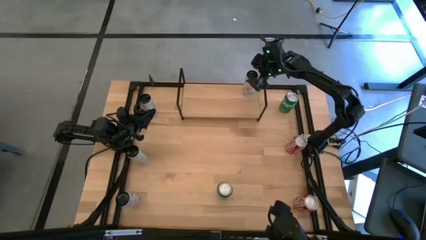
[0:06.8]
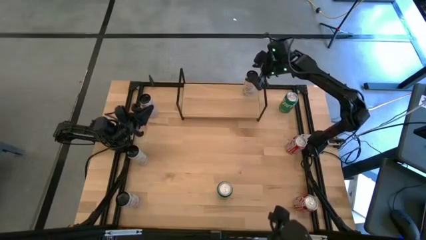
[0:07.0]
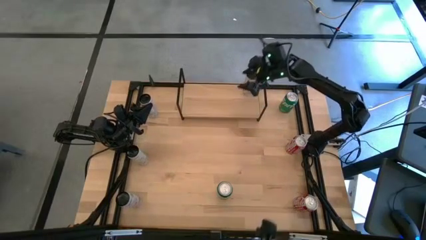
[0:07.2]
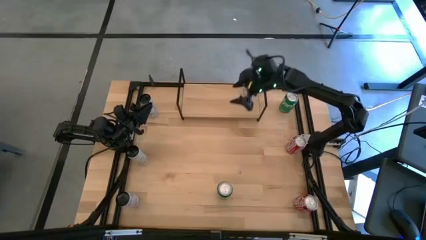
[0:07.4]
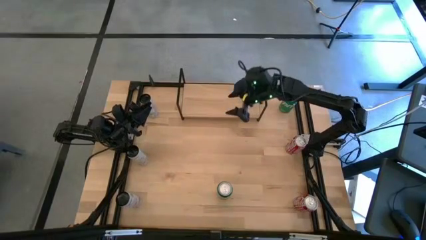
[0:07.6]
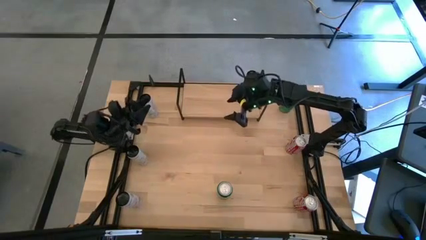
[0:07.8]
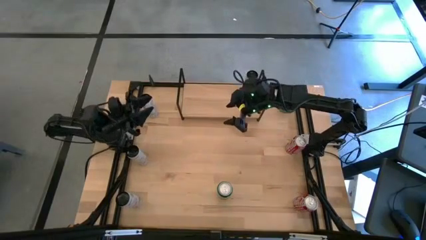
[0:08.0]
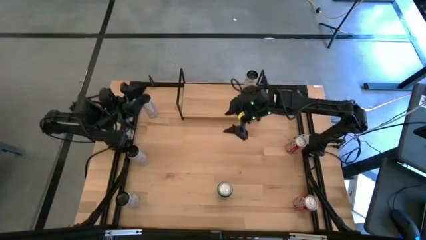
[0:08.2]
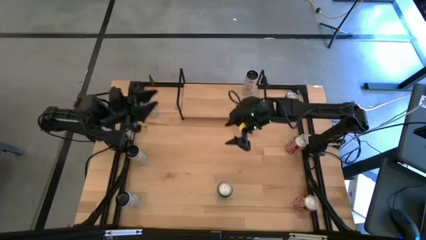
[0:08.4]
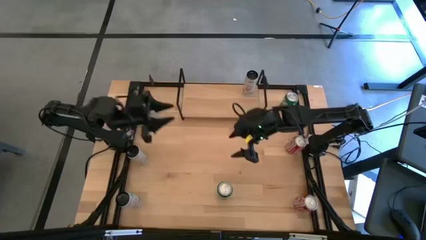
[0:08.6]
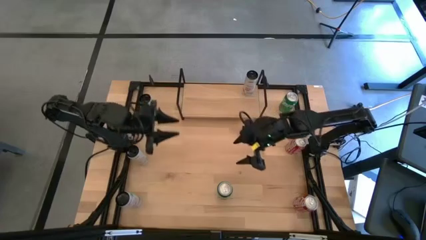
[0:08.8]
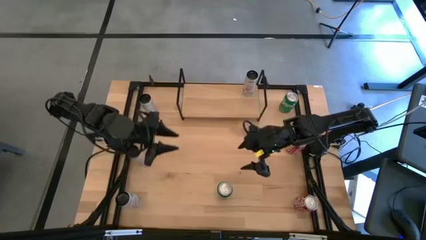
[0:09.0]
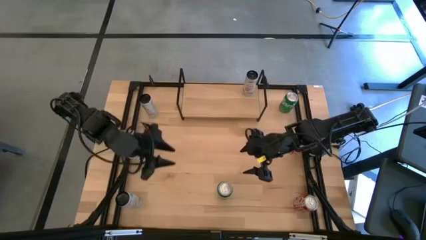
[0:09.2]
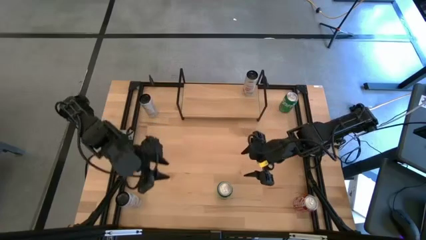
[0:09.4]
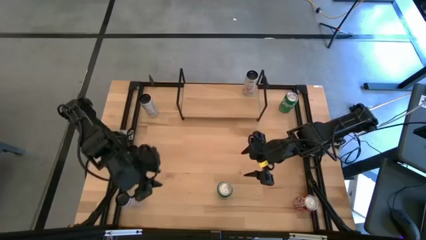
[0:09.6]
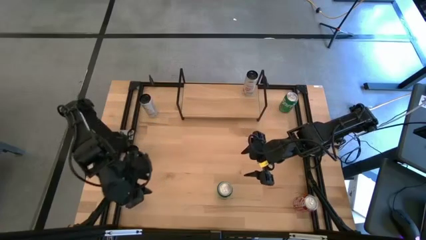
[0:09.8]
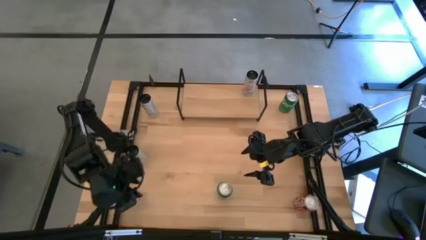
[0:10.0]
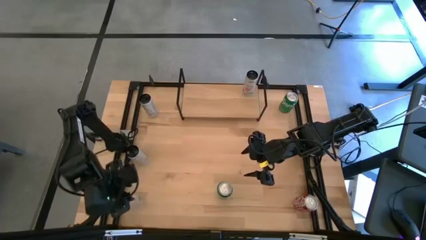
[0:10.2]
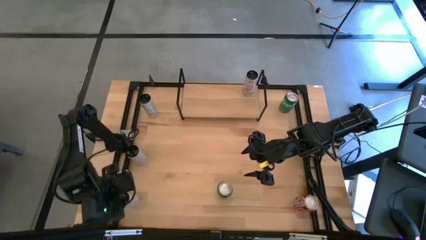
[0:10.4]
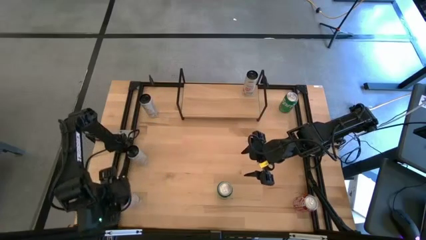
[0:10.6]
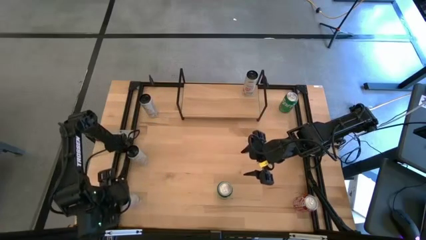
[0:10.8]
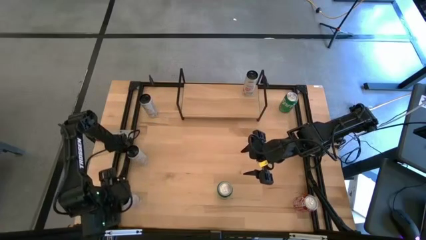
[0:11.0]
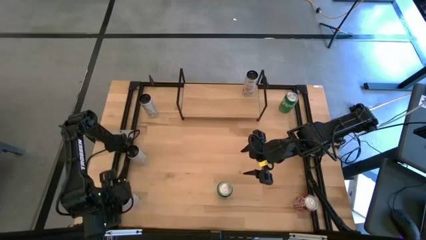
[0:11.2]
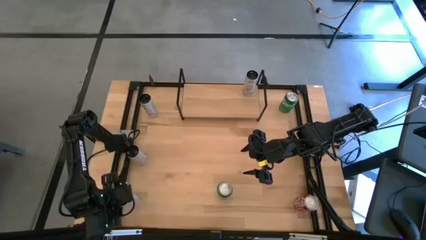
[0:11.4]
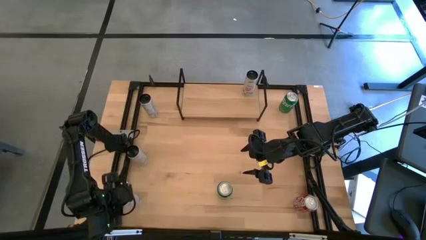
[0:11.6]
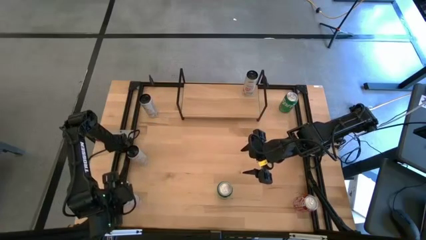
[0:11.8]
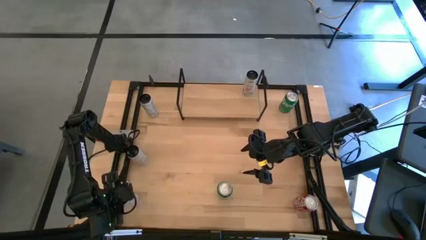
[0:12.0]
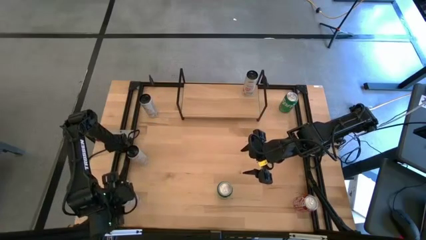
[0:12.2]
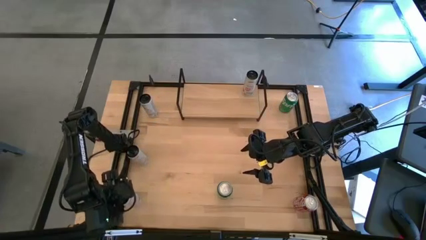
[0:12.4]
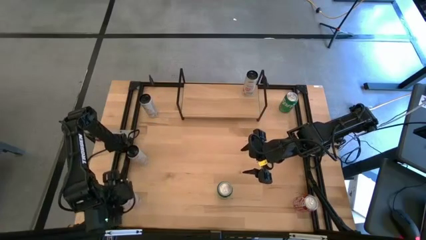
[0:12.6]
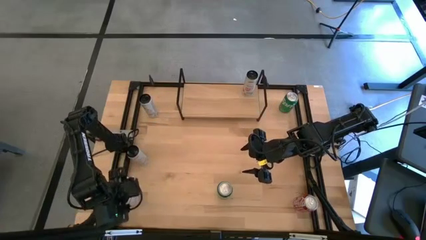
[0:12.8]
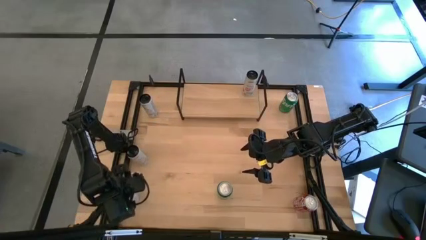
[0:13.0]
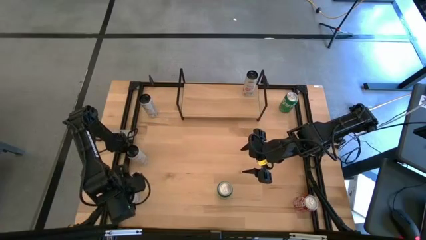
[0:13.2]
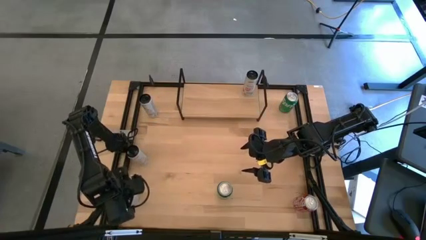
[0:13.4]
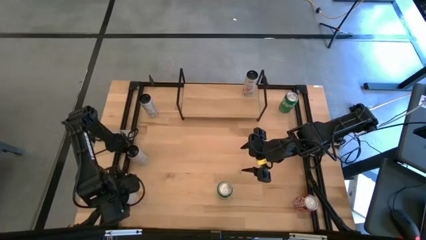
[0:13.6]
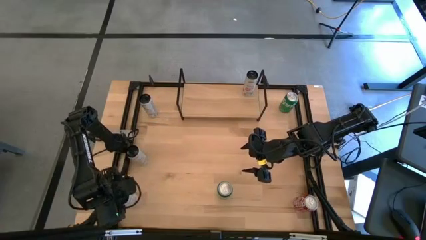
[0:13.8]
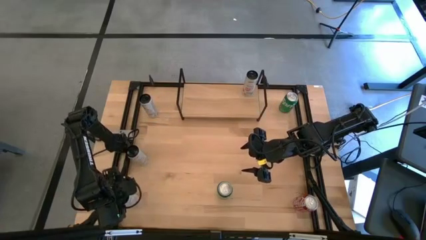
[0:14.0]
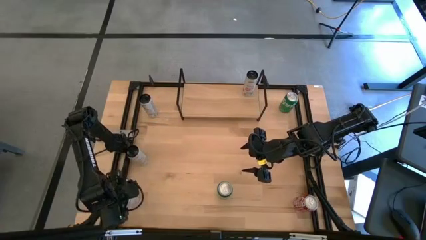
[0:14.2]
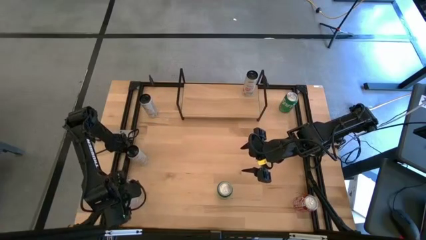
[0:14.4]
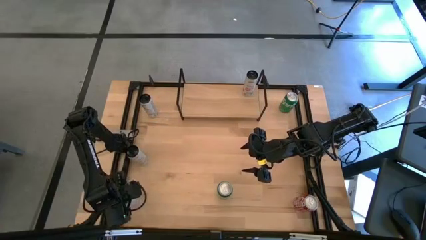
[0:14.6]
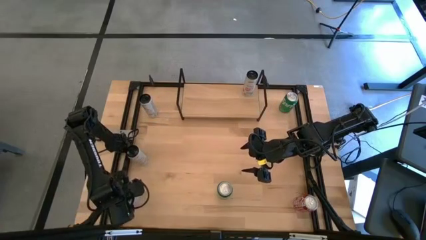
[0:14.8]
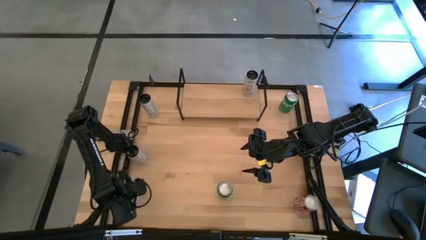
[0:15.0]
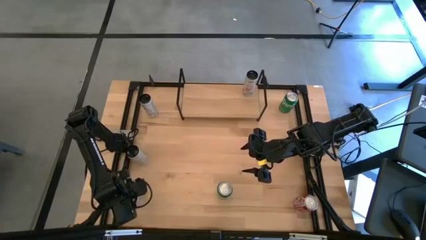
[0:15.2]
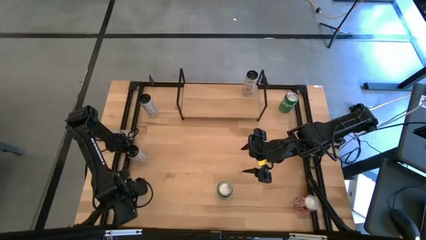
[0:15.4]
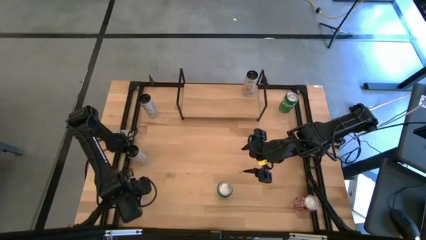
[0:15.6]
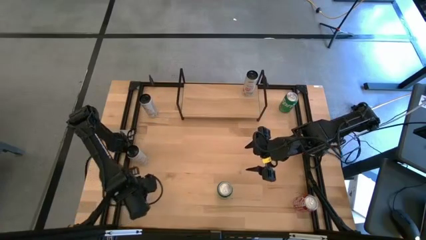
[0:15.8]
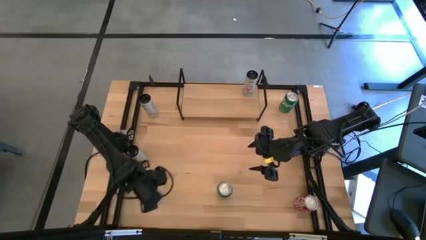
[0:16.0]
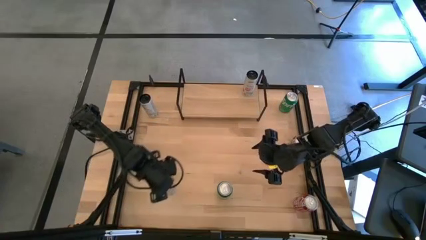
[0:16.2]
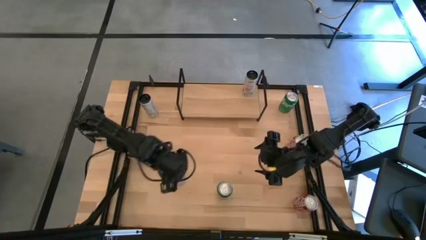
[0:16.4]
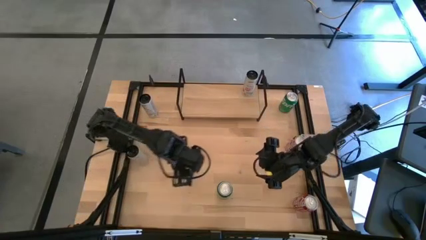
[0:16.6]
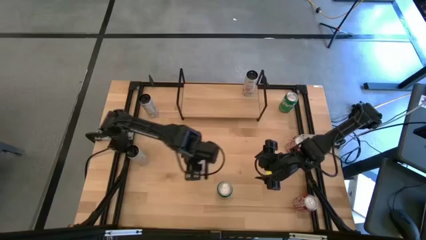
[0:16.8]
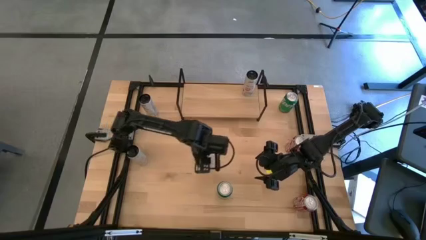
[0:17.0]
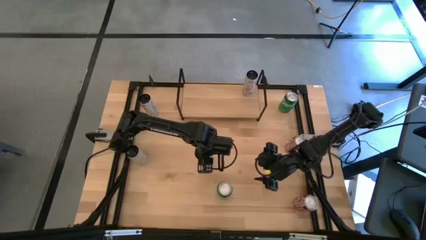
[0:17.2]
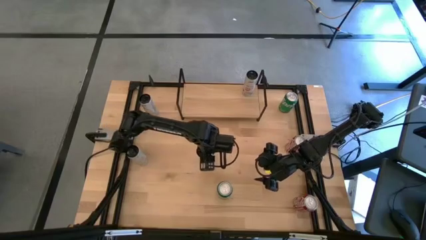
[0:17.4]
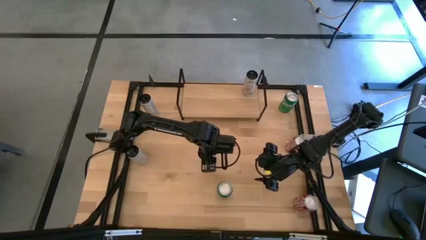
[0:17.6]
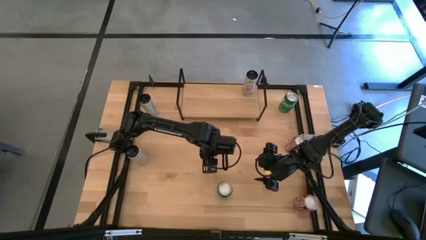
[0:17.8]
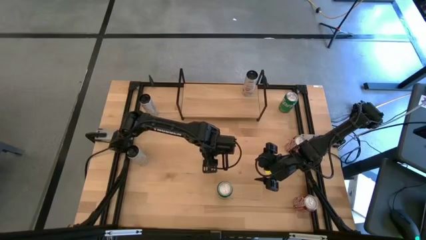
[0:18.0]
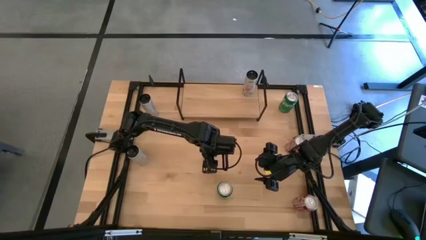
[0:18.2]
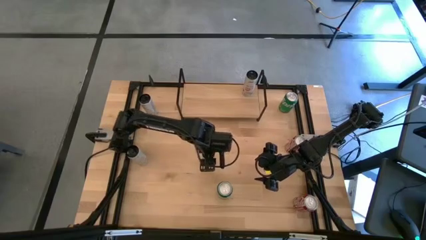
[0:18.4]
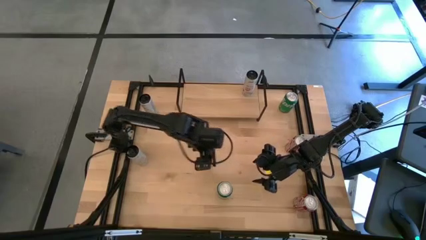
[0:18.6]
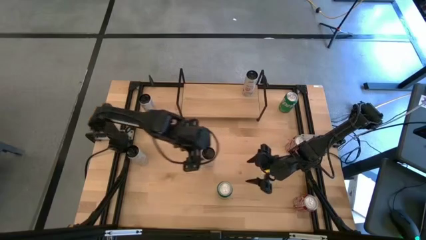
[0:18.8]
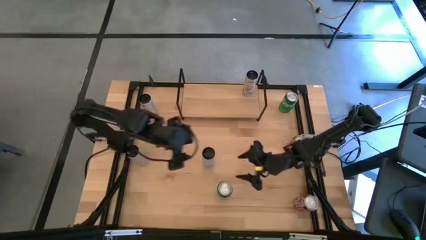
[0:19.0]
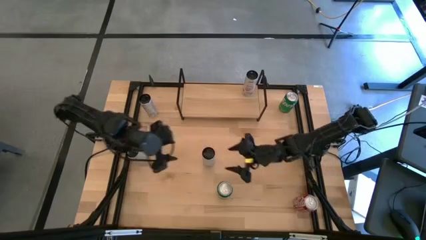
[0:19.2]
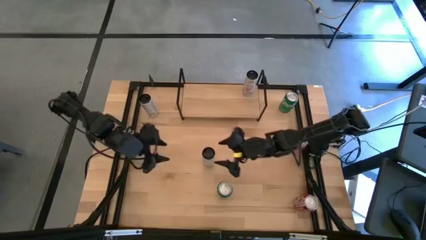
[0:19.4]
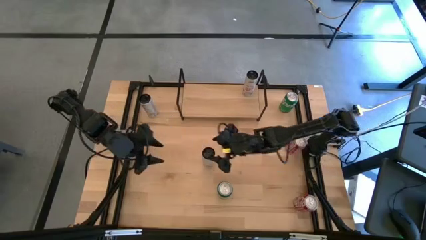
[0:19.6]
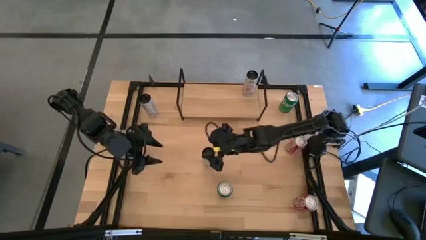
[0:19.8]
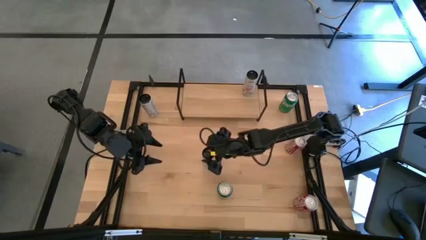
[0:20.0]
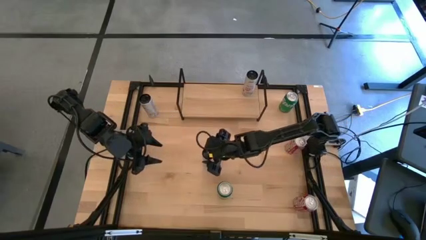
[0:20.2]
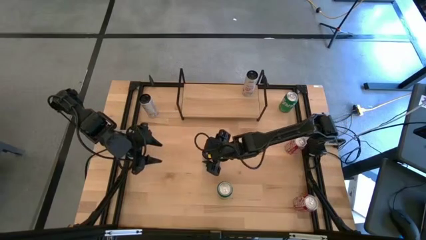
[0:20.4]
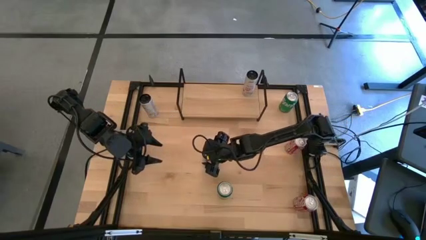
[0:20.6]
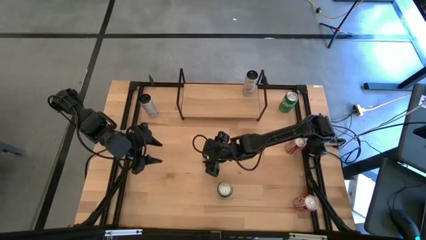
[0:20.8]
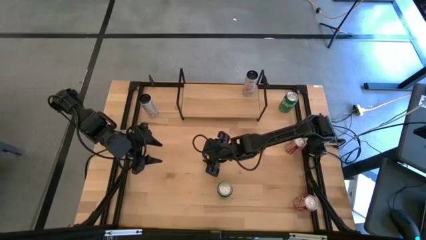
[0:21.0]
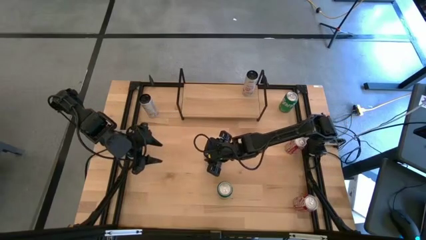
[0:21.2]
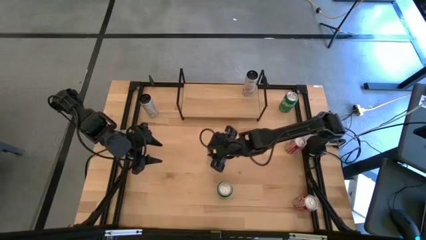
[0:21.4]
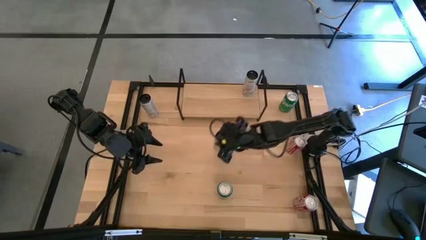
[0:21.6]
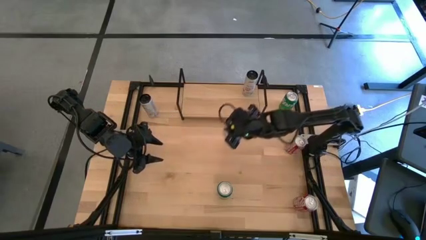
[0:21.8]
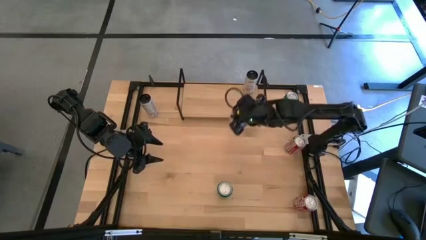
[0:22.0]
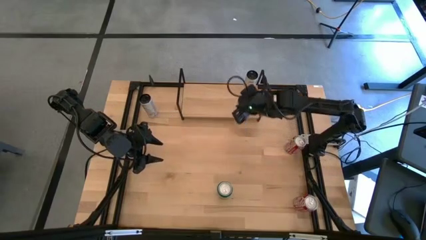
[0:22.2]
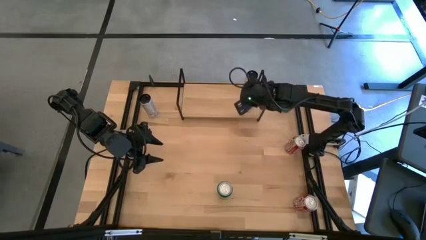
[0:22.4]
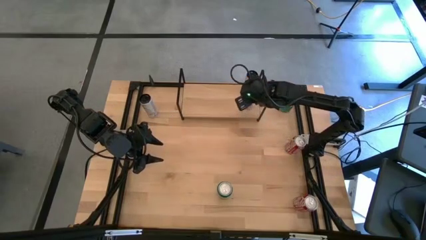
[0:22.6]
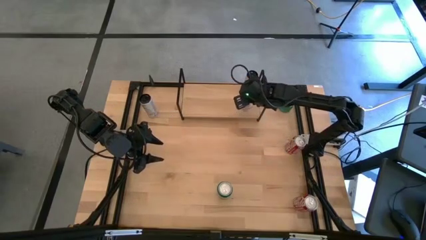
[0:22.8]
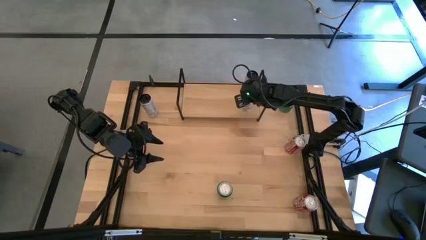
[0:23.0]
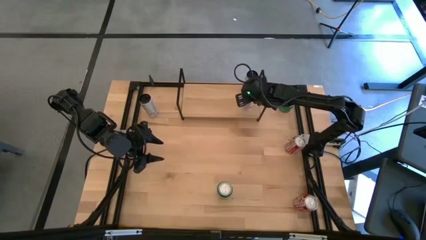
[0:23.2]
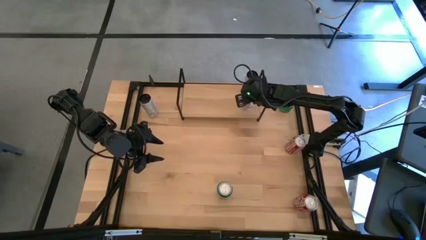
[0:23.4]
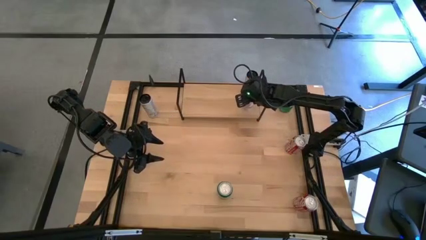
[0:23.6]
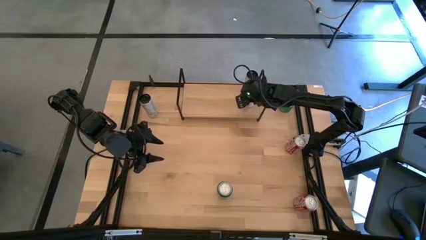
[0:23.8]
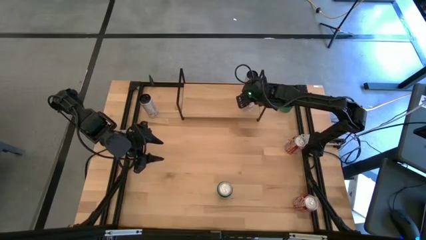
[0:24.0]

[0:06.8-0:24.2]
Task: Place canned beverage on shelf
Put the white pink soda can on the shelf aligned with the other white pink soda can
